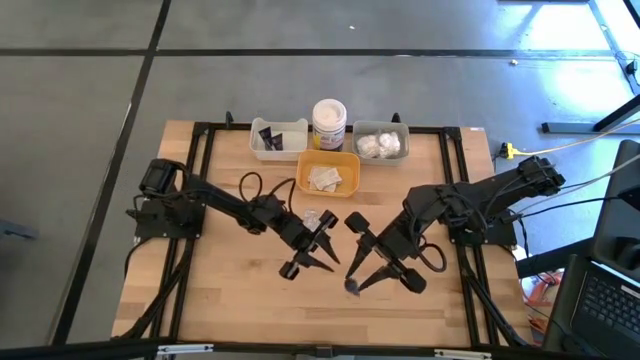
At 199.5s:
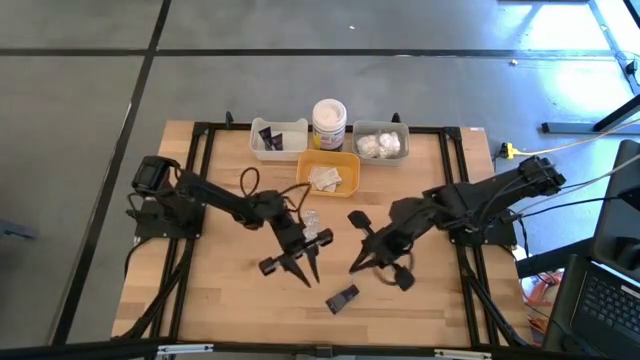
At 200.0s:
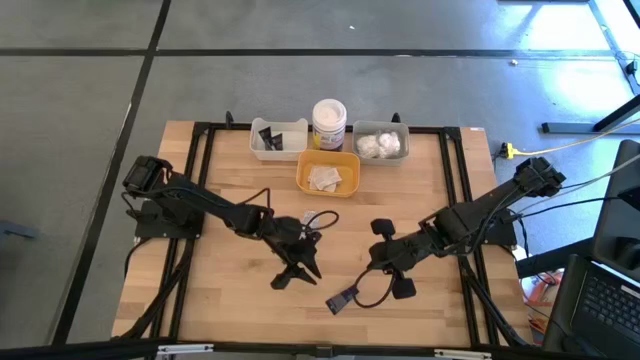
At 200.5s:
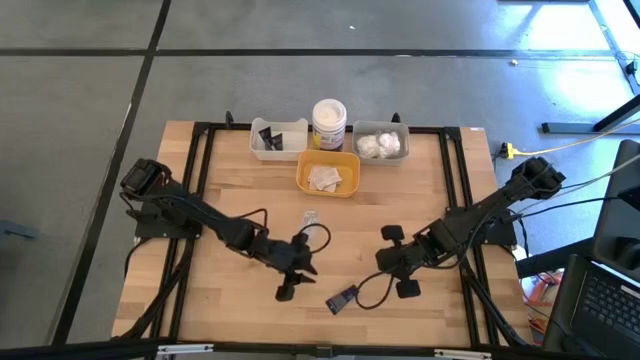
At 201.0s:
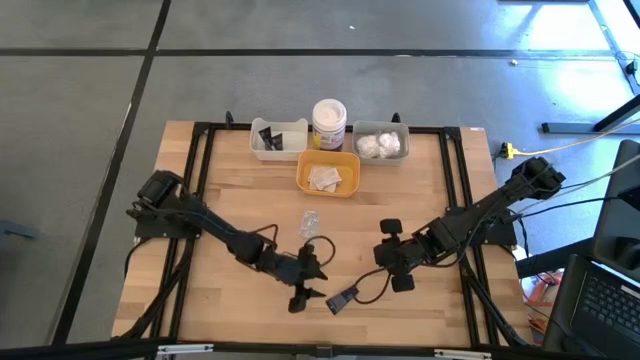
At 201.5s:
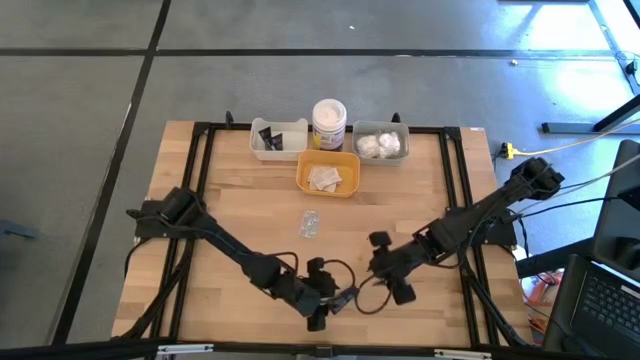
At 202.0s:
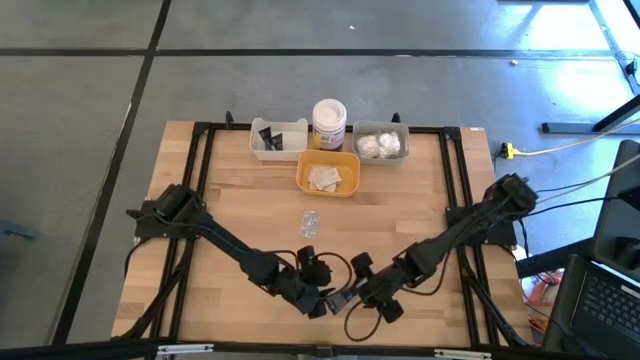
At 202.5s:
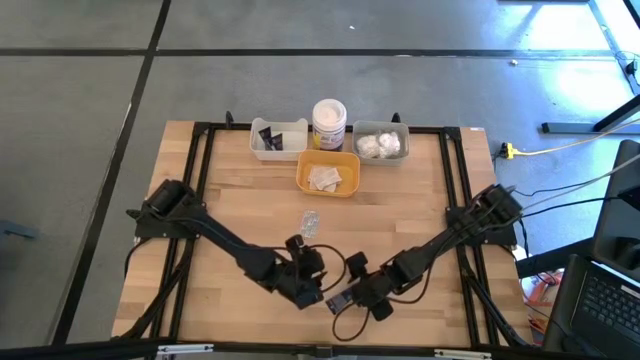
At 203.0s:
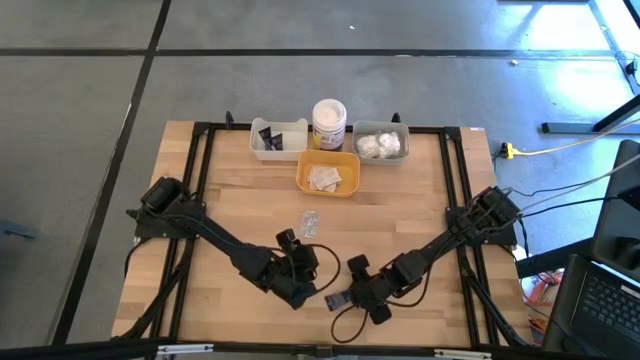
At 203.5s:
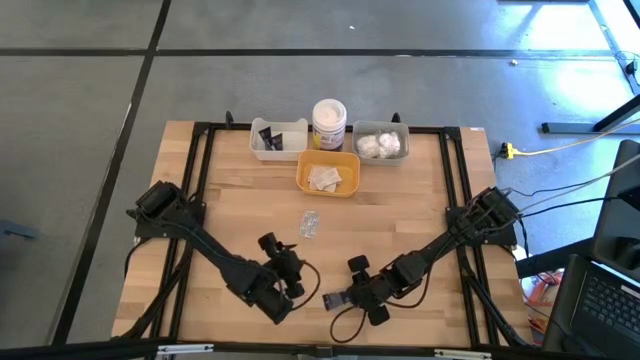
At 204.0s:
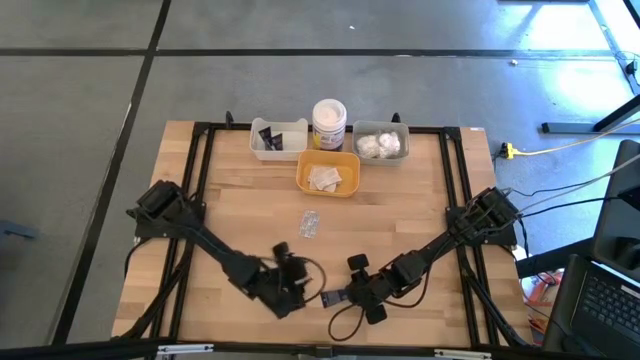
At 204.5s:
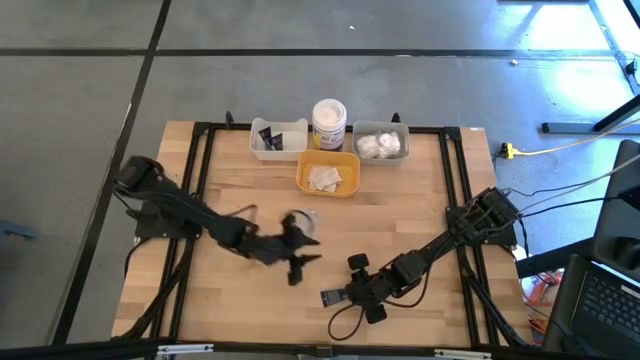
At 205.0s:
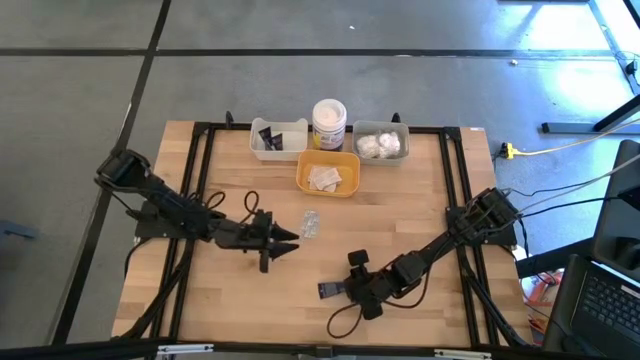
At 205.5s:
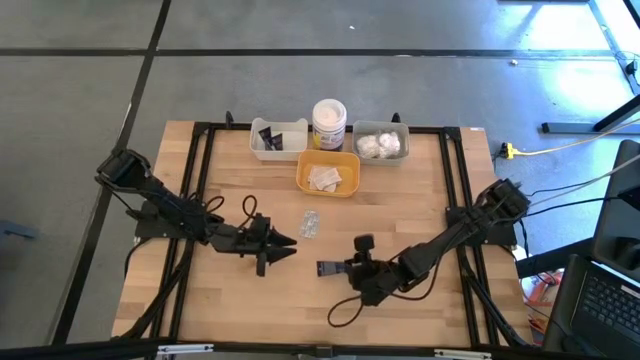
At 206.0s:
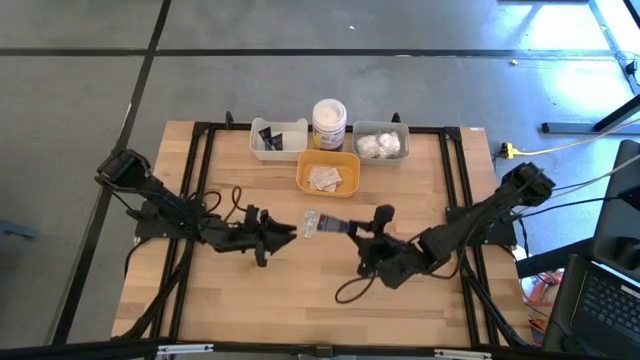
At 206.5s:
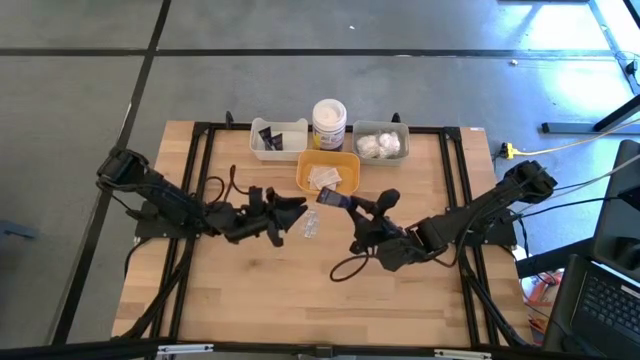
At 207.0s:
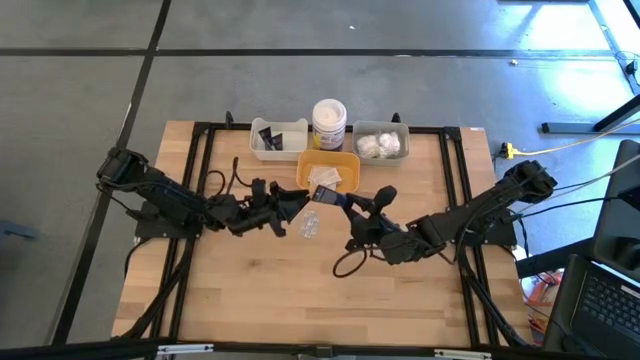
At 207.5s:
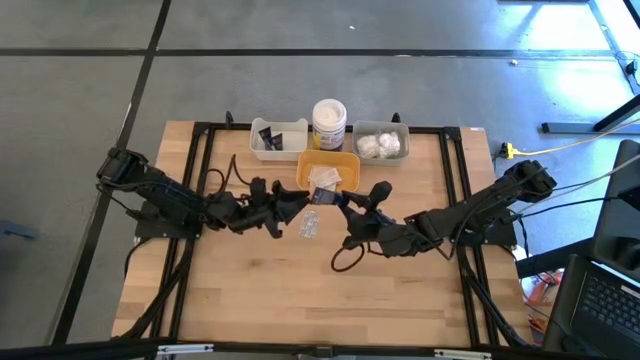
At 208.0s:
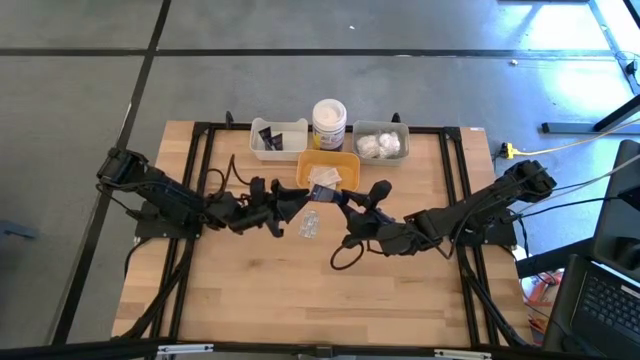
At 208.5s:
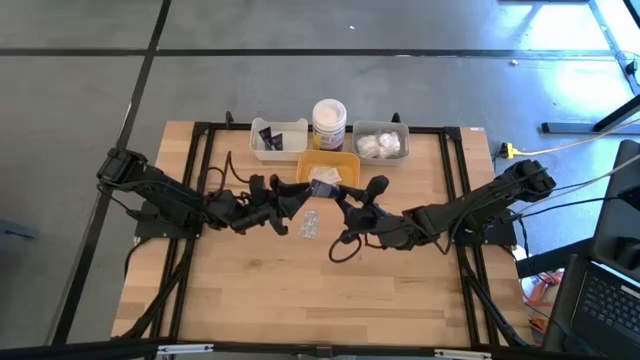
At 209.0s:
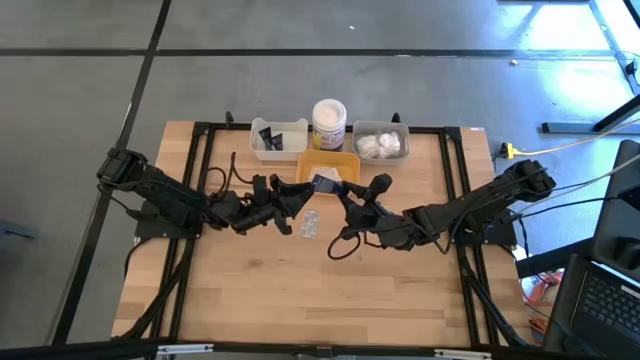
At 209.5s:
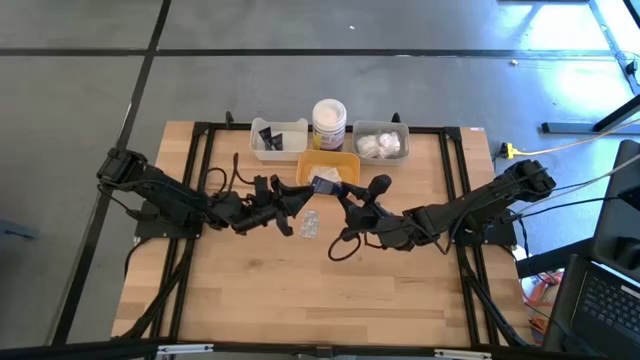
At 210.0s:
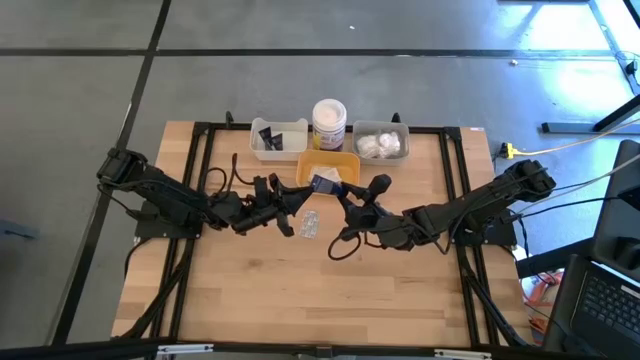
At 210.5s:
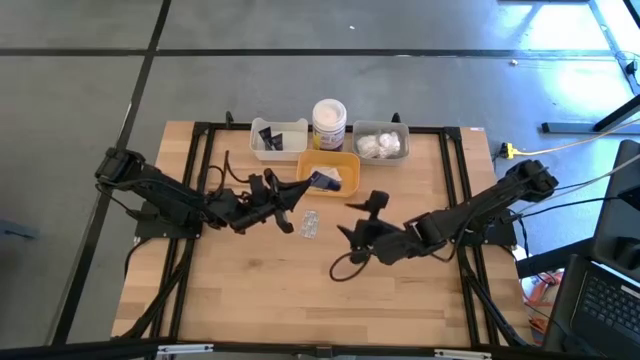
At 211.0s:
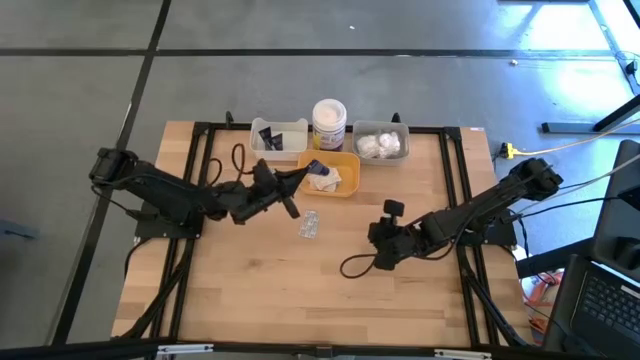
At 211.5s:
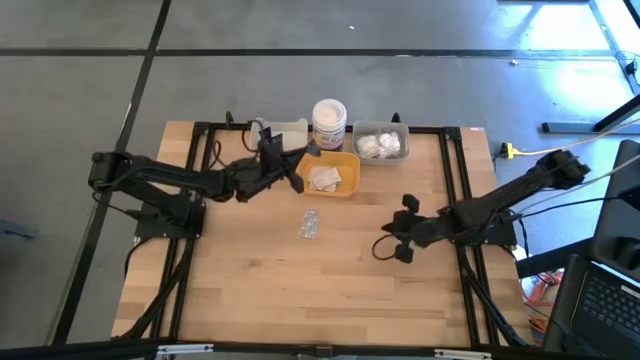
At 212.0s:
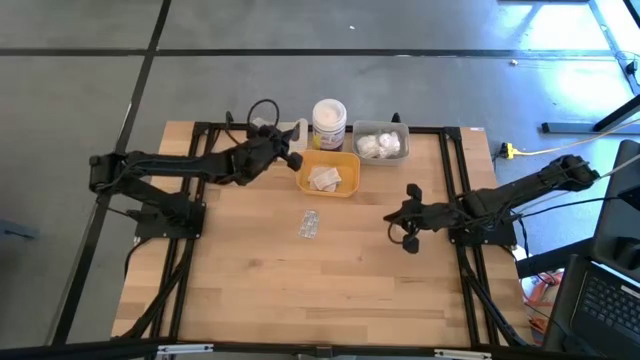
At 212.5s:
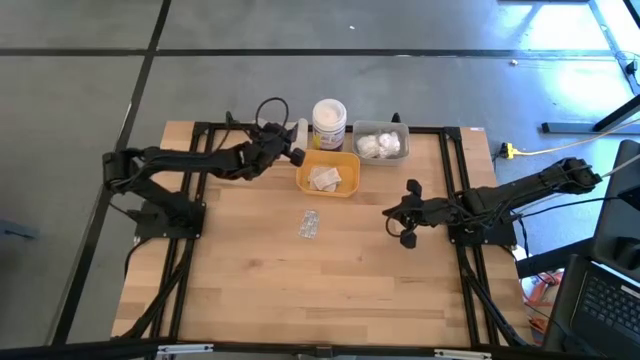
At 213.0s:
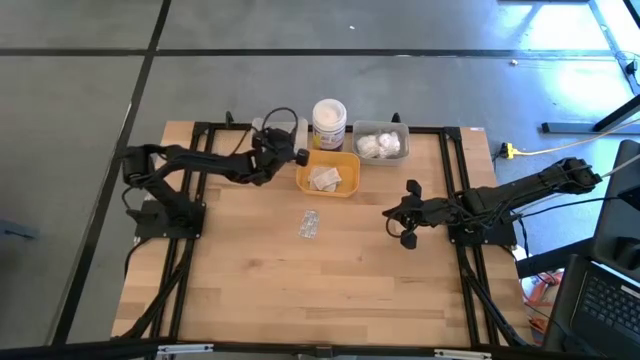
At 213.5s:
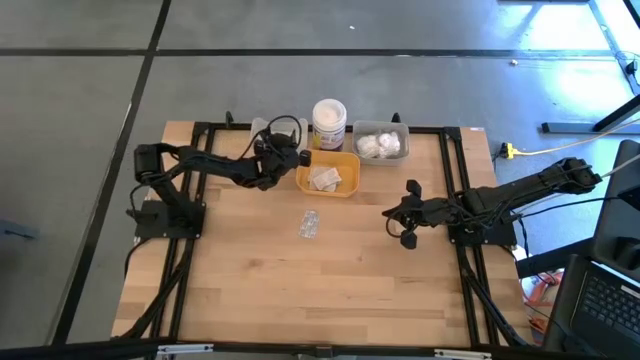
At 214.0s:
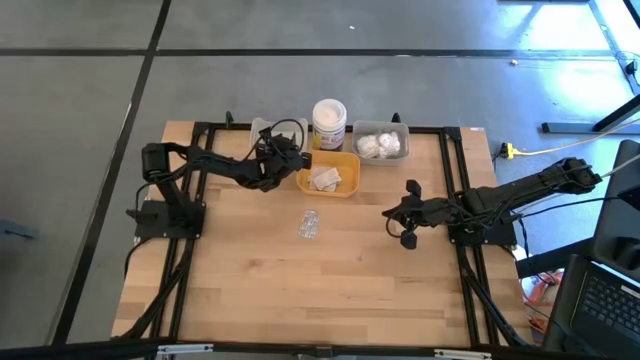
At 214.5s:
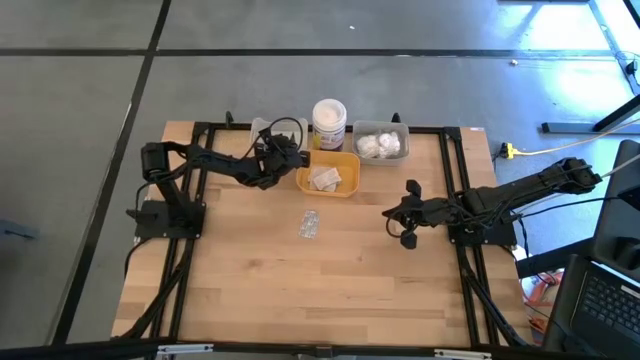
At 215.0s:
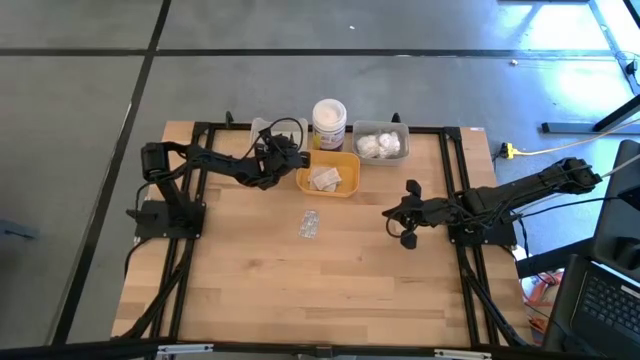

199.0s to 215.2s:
Task: Pick & Place Travel size toiletries
Put the blue shave cream into the white bin

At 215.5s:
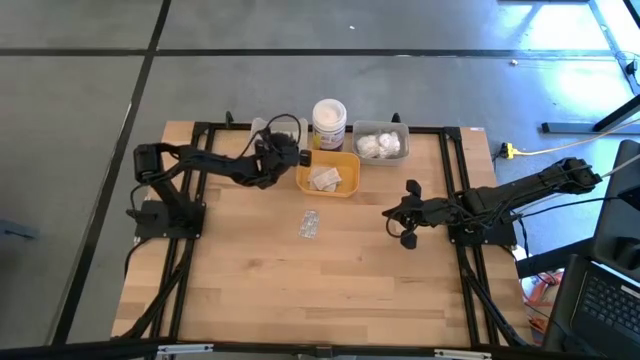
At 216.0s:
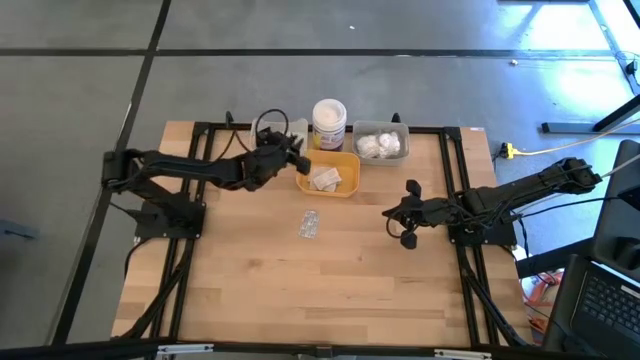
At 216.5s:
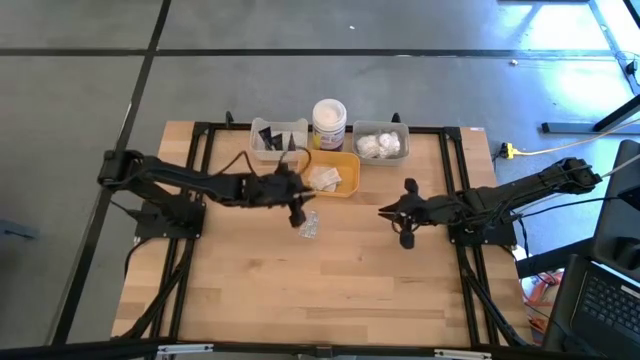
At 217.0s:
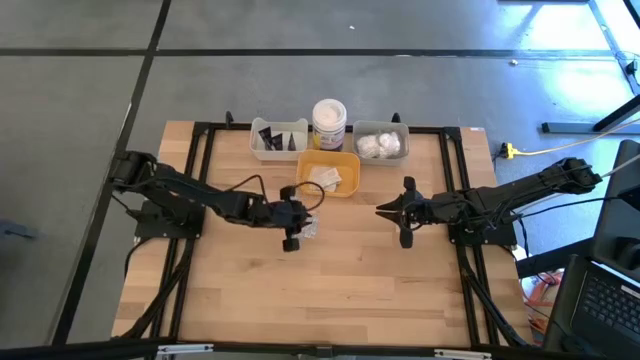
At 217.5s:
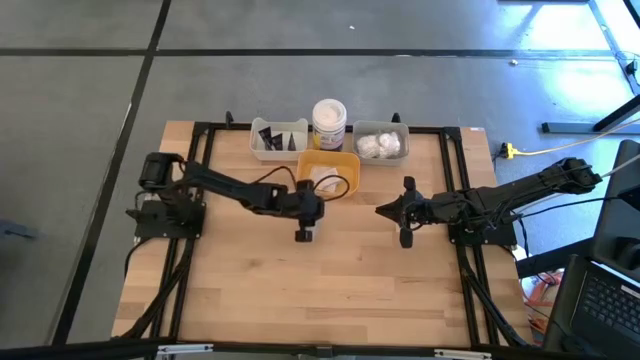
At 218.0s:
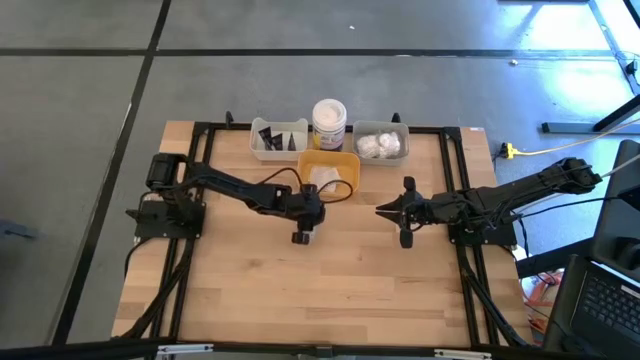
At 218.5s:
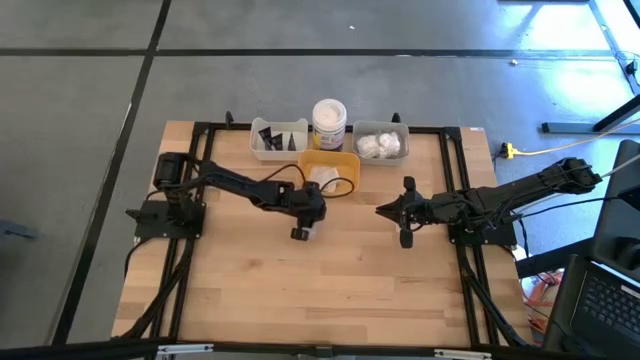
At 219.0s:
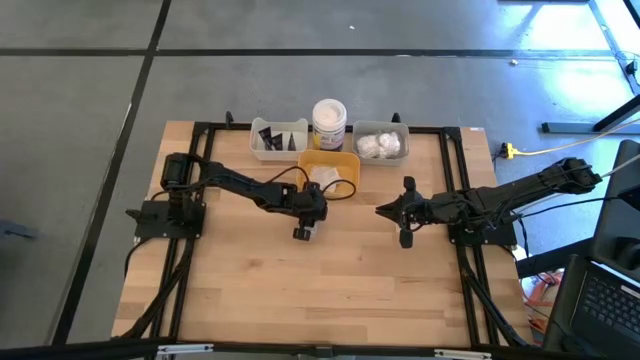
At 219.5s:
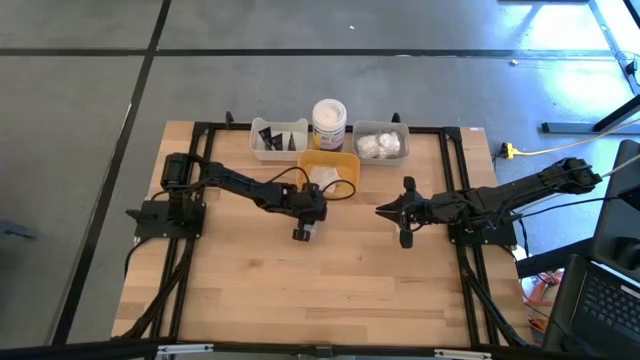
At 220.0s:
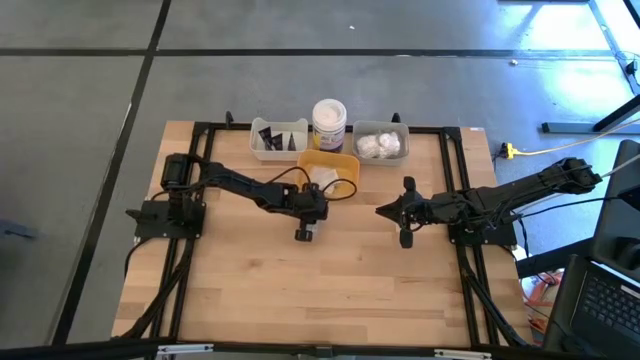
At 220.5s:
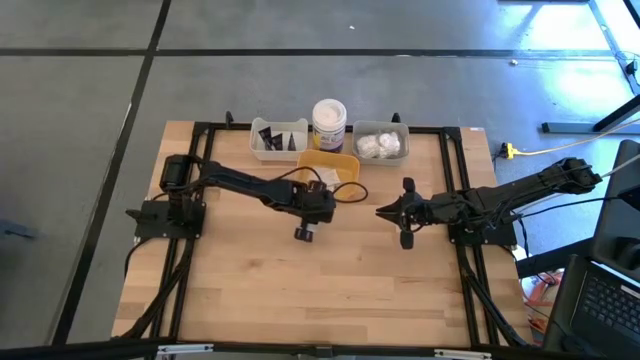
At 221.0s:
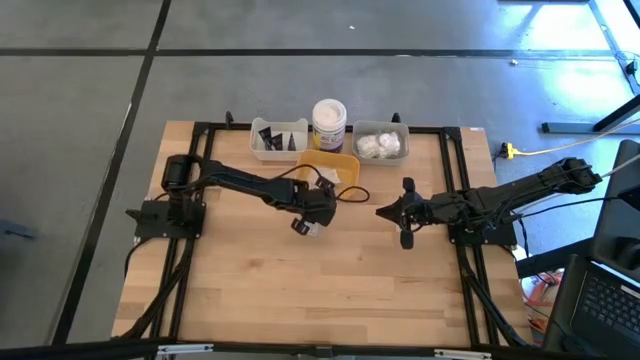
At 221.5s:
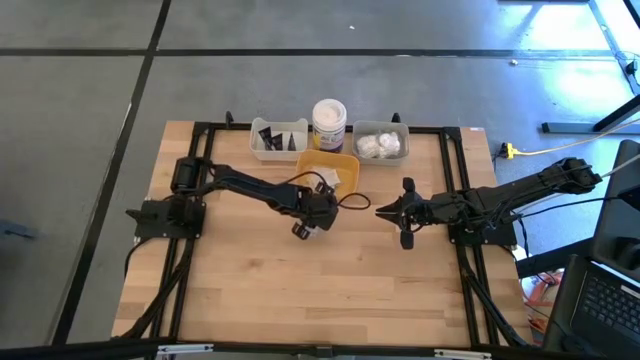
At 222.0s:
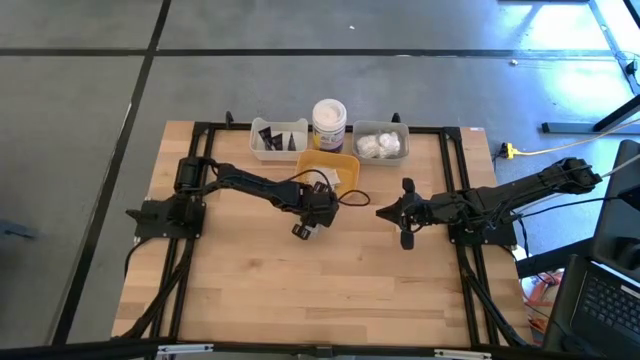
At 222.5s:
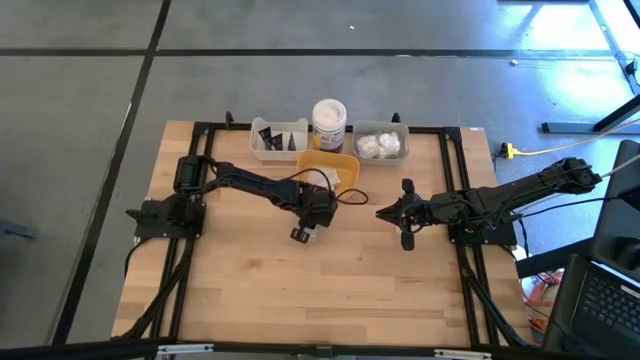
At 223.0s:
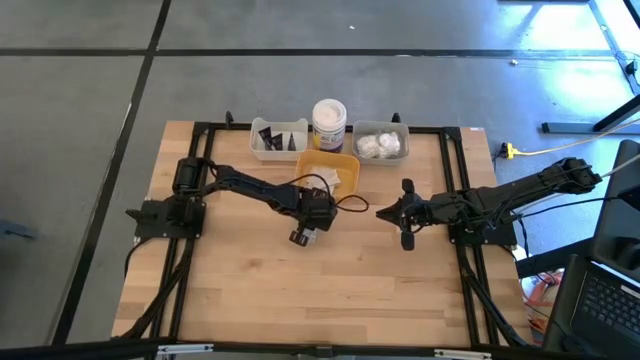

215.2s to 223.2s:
Put the white bandage into the yellow bin
